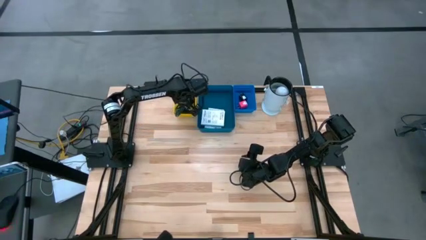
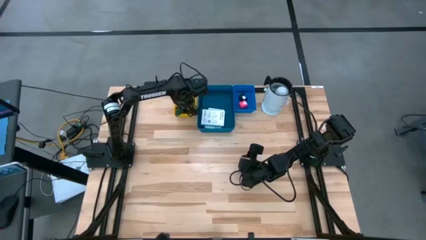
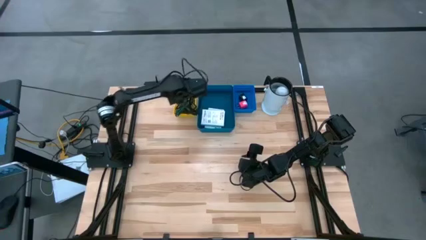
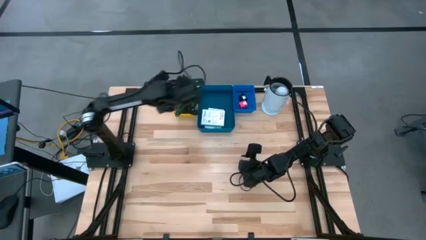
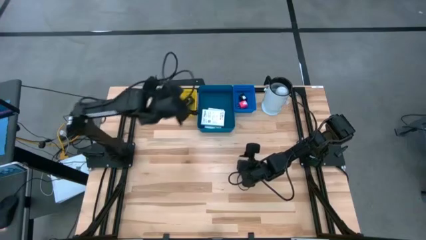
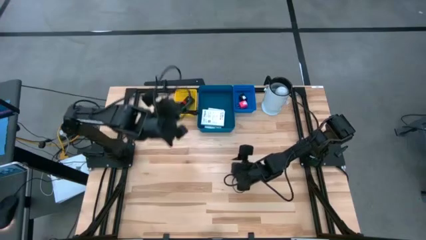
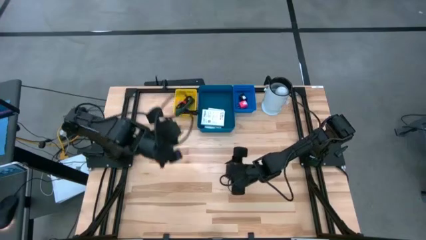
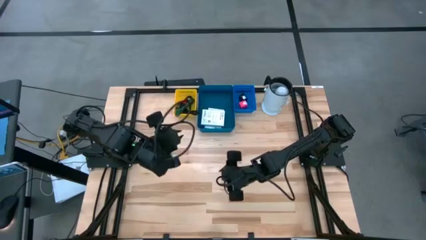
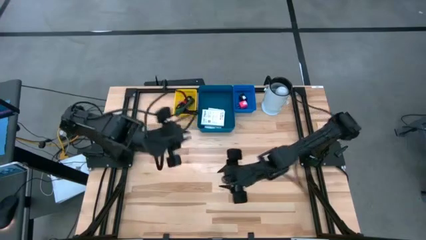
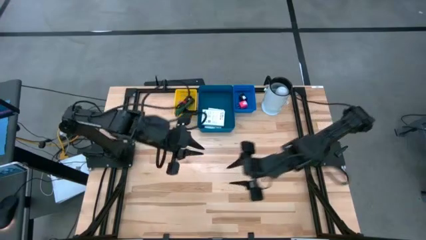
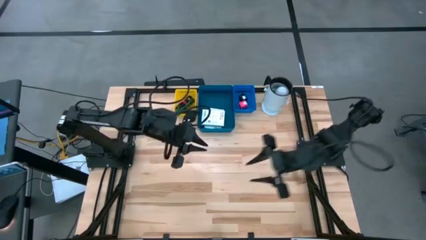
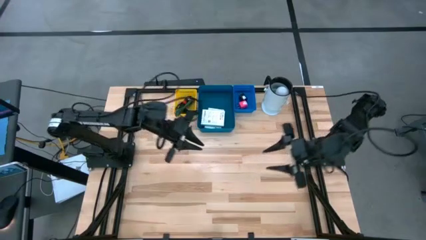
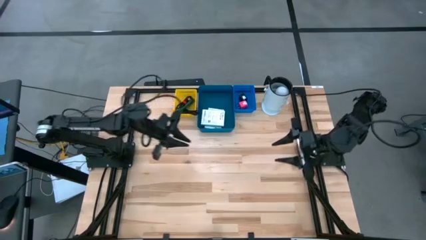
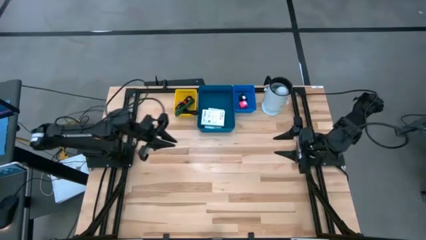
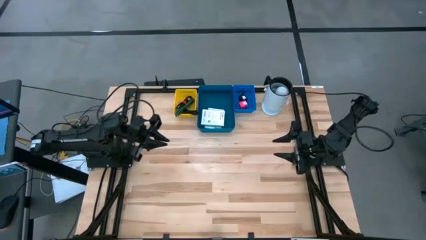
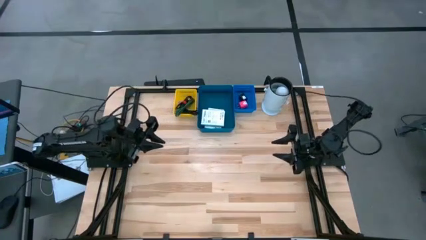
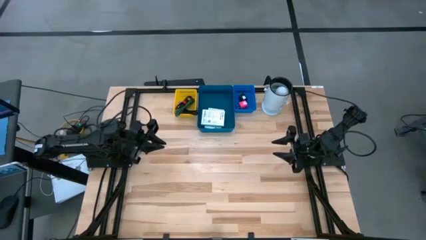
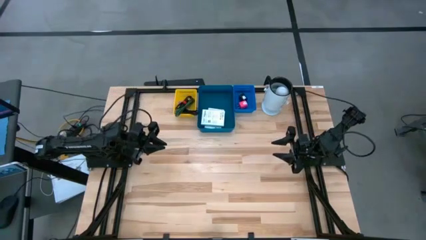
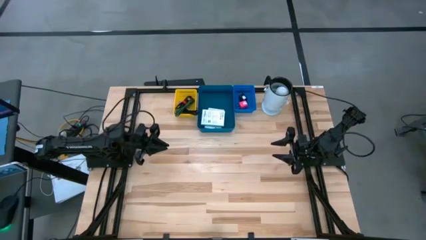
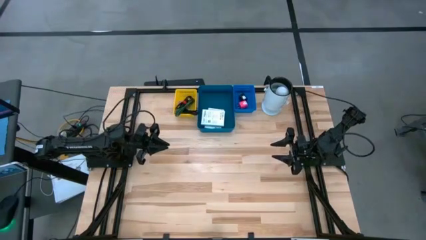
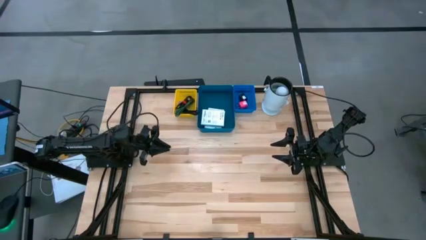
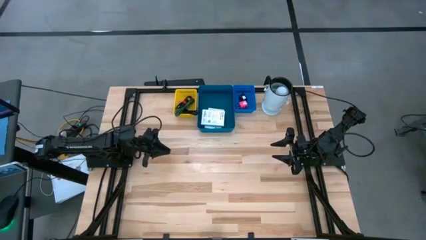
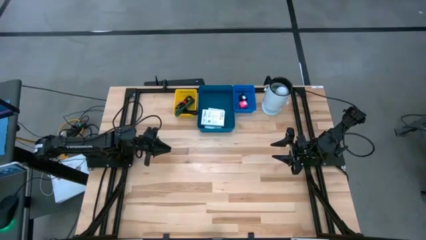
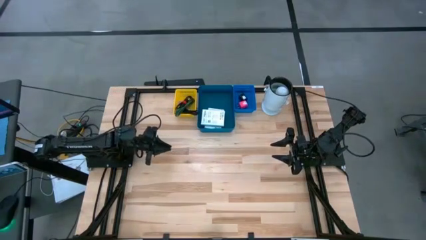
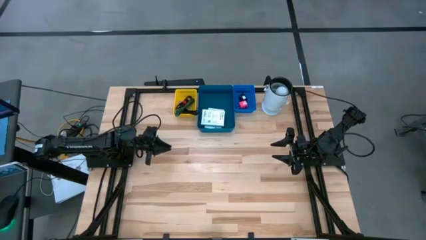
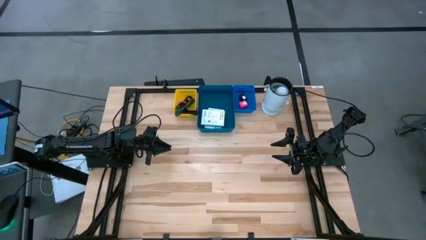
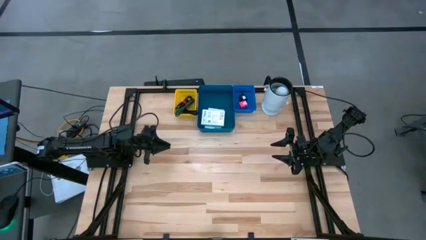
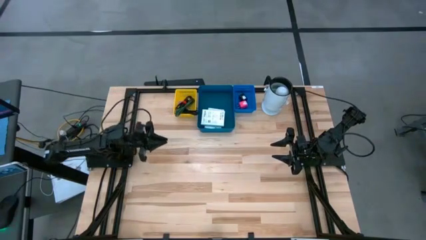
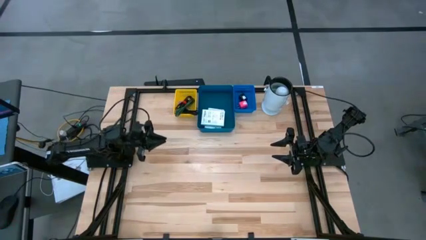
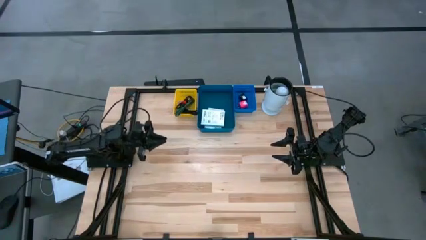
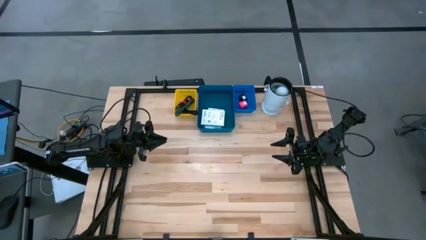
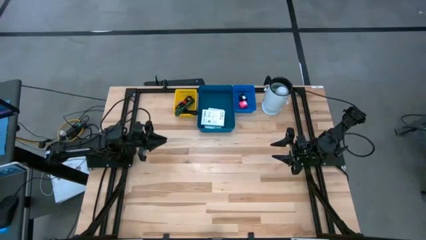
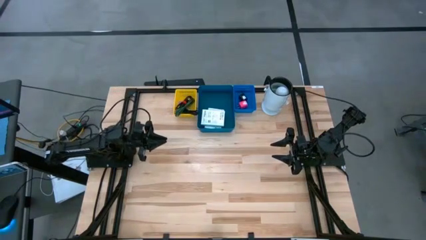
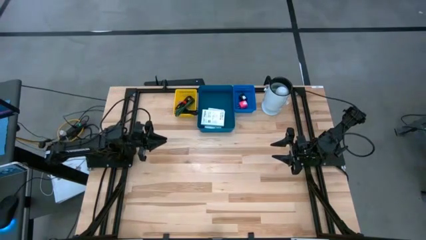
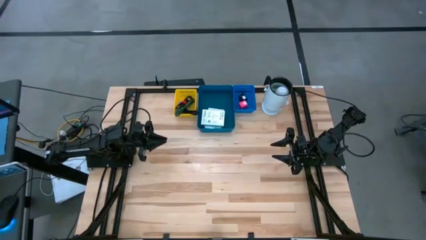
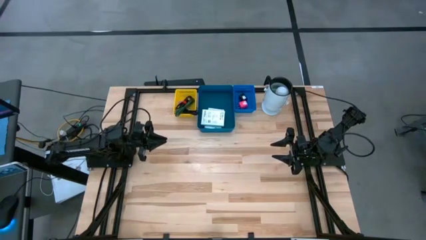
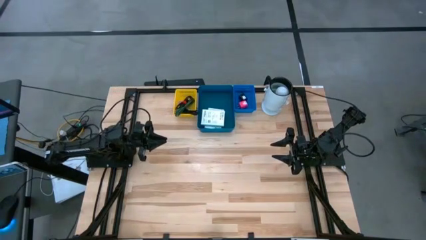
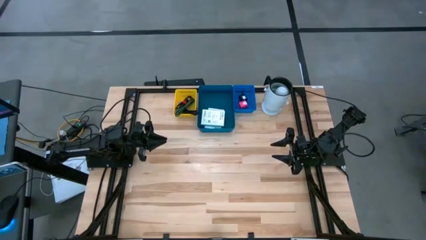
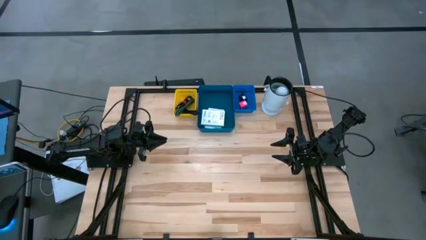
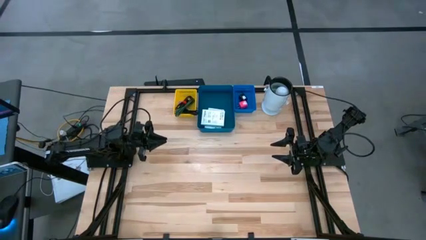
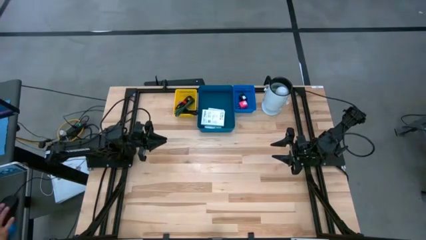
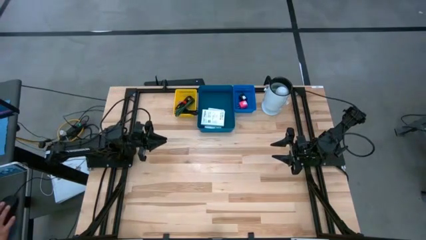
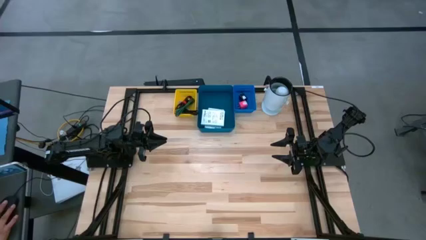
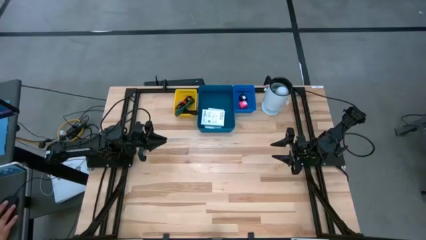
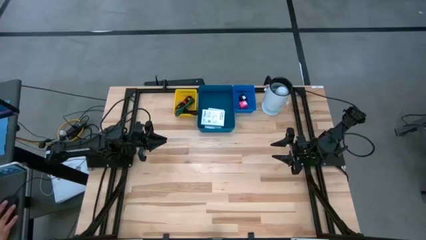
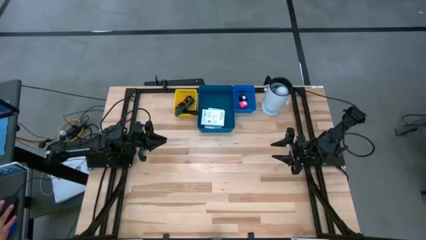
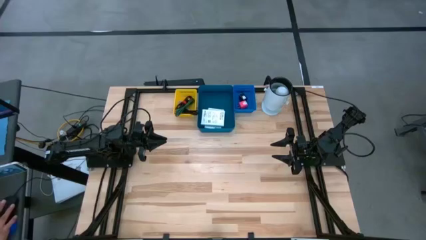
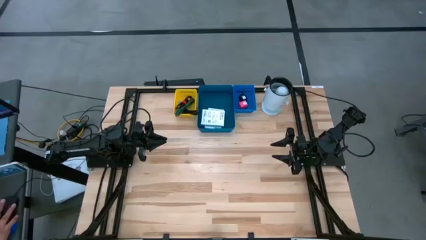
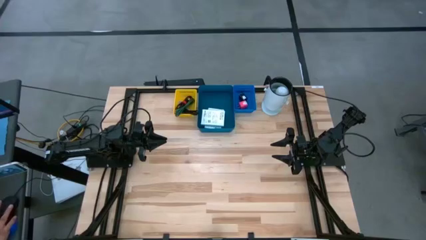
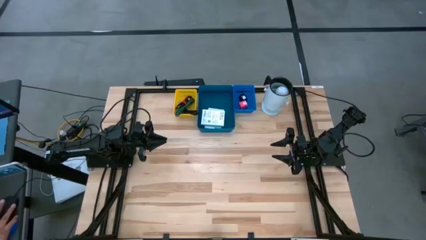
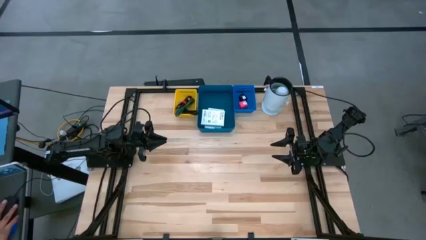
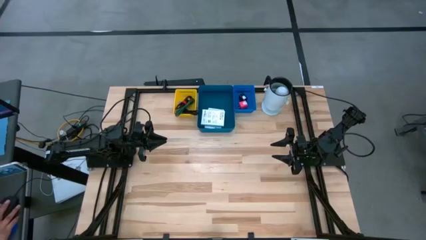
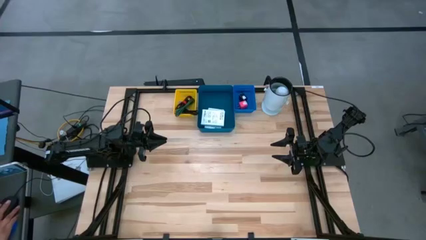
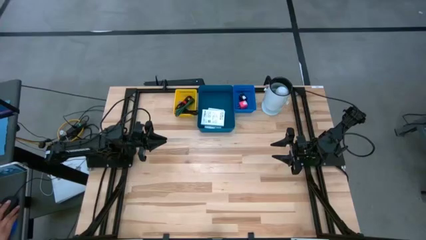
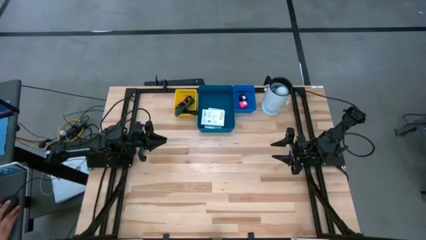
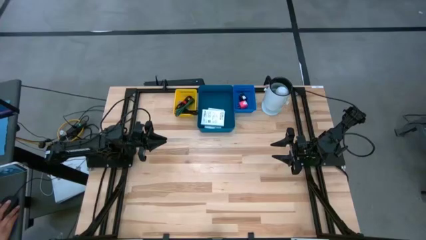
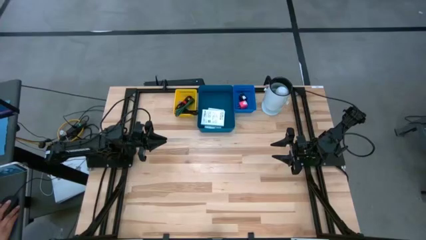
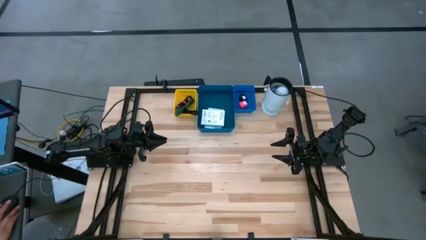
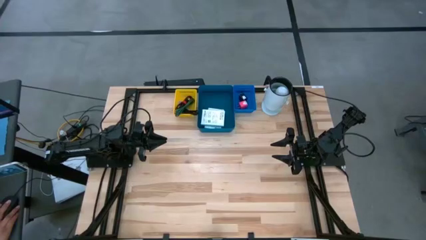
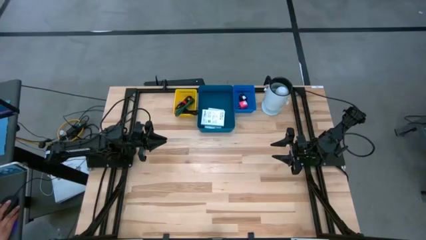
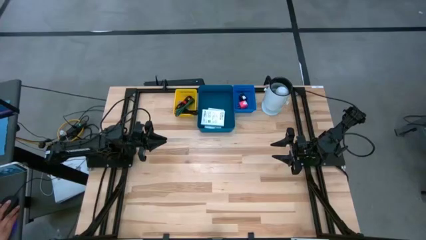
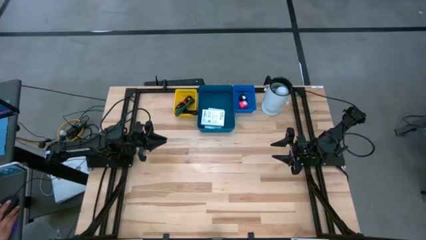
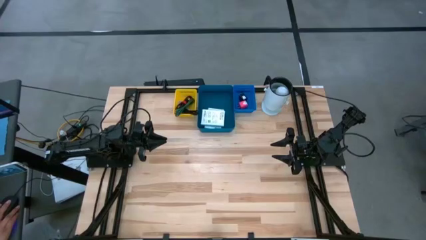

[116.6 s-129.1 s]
Task: Pick and place items into bin
Return to Home Position
